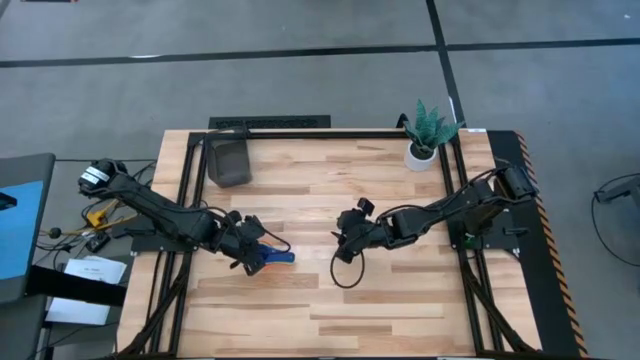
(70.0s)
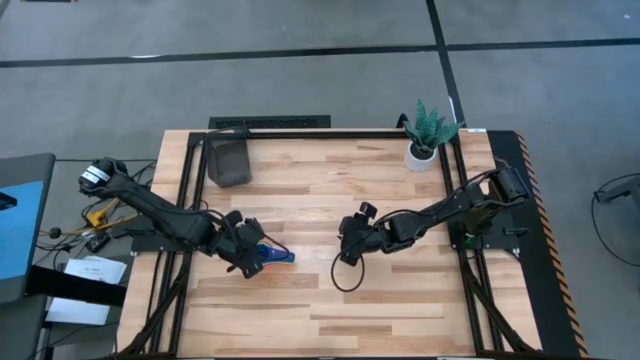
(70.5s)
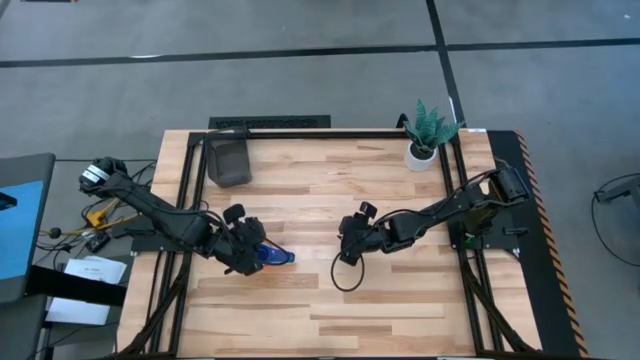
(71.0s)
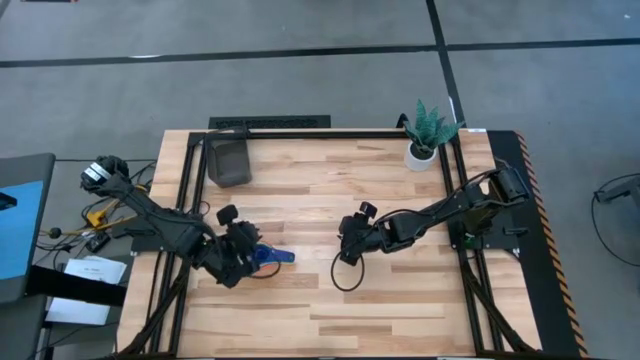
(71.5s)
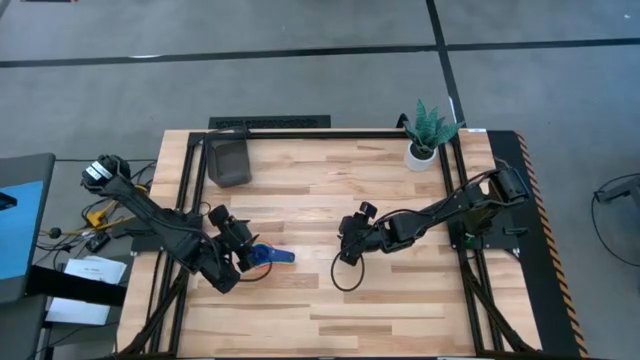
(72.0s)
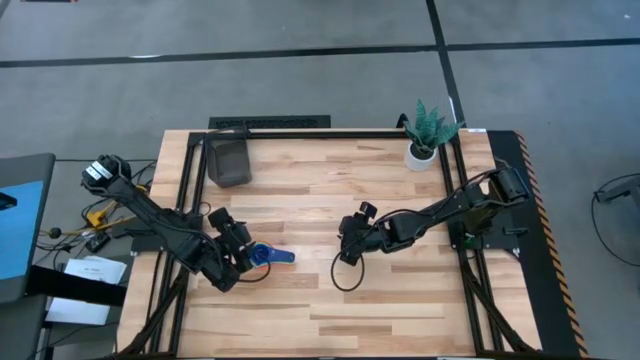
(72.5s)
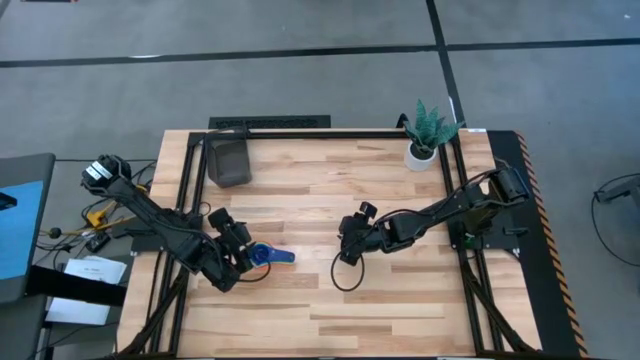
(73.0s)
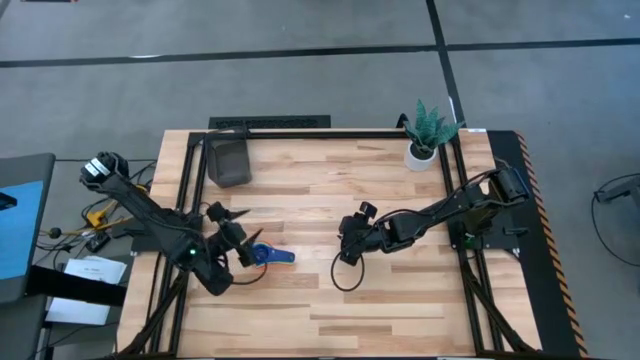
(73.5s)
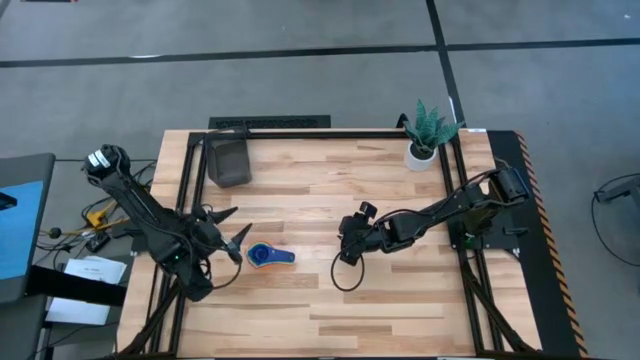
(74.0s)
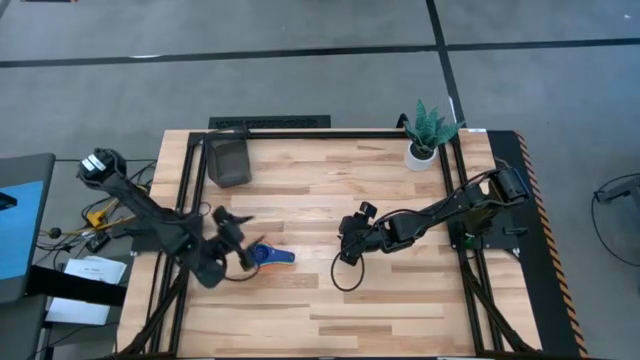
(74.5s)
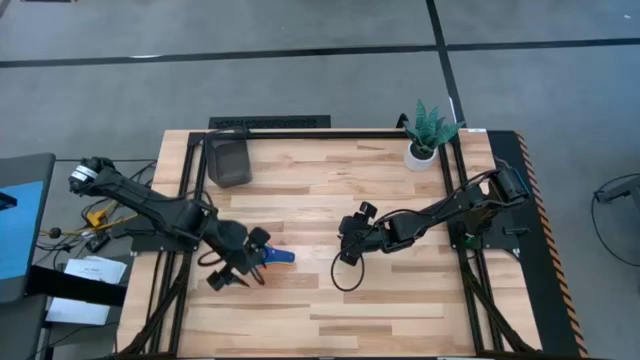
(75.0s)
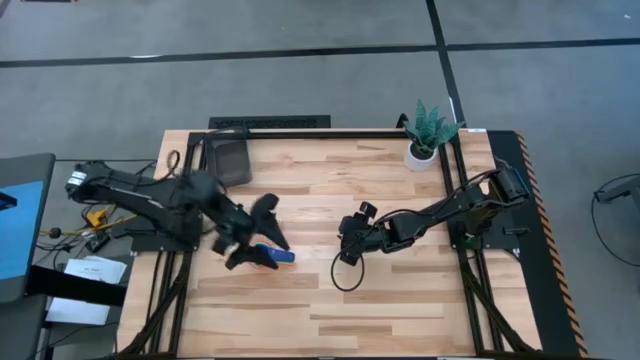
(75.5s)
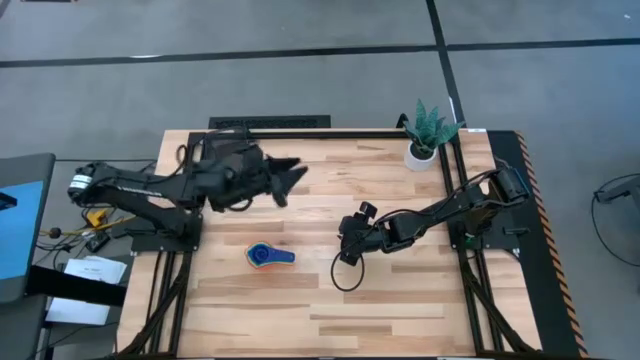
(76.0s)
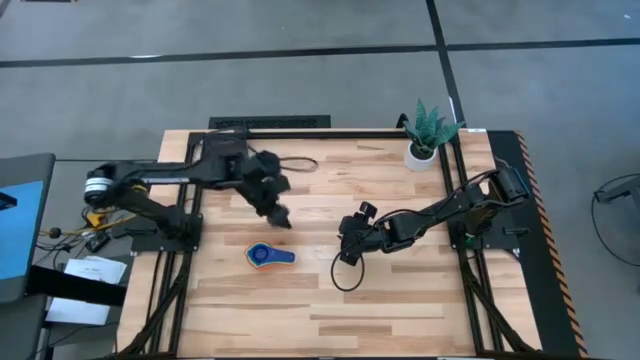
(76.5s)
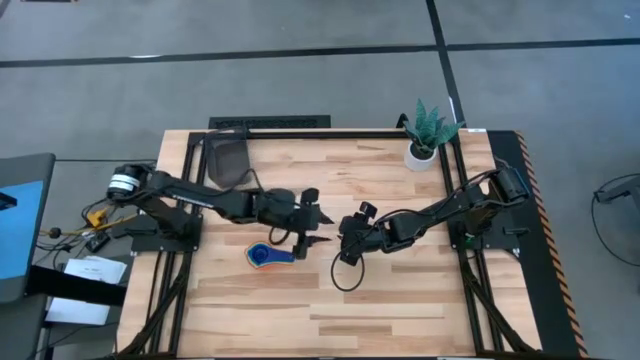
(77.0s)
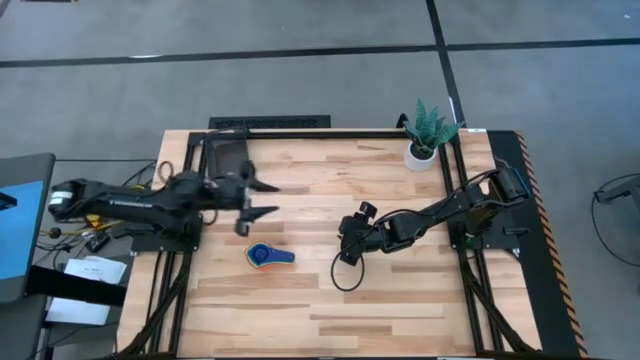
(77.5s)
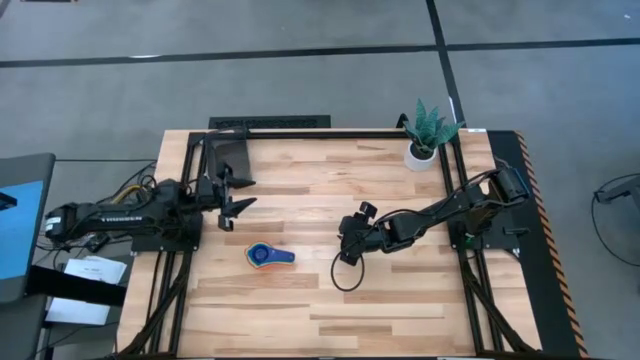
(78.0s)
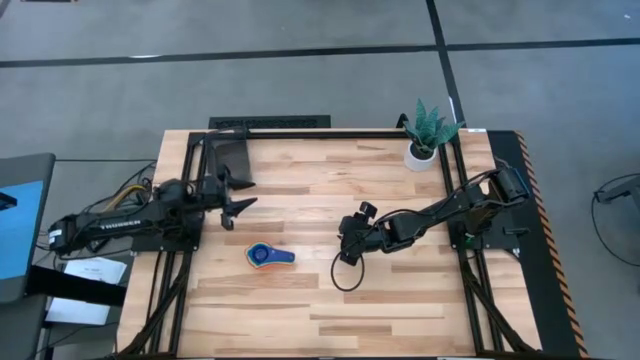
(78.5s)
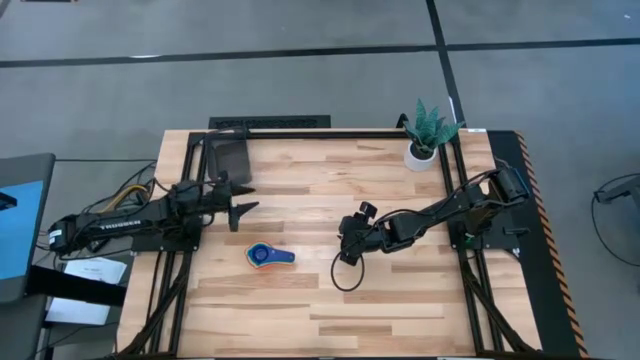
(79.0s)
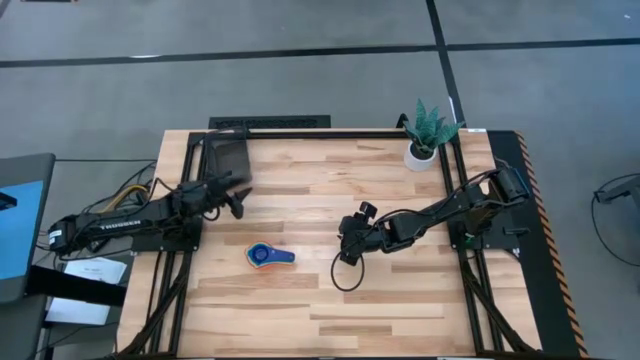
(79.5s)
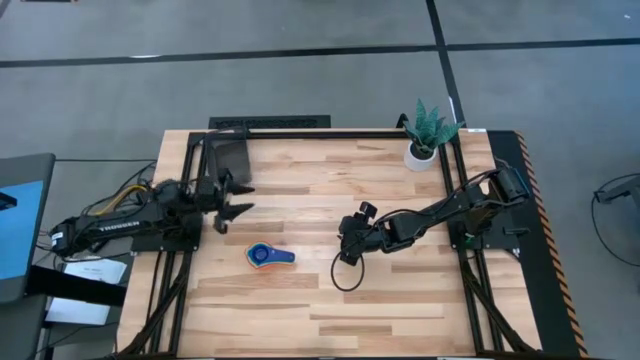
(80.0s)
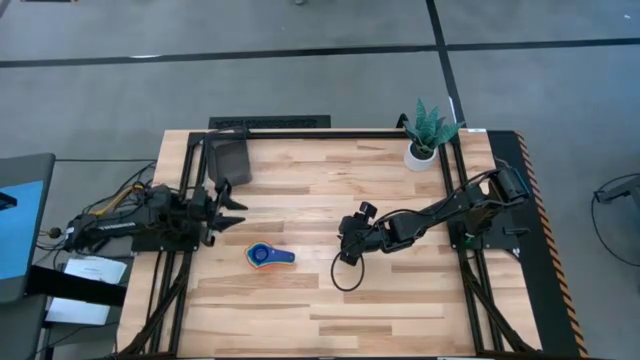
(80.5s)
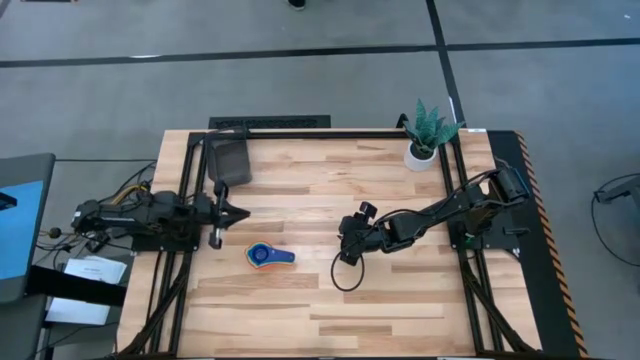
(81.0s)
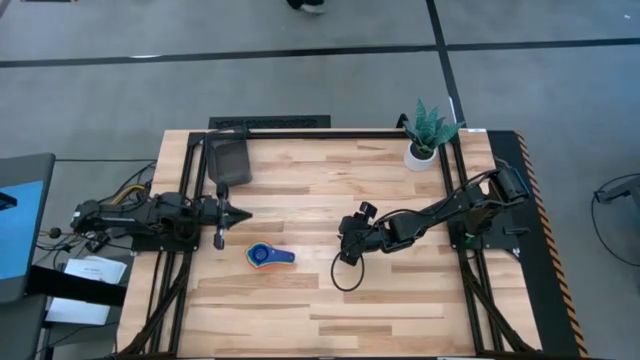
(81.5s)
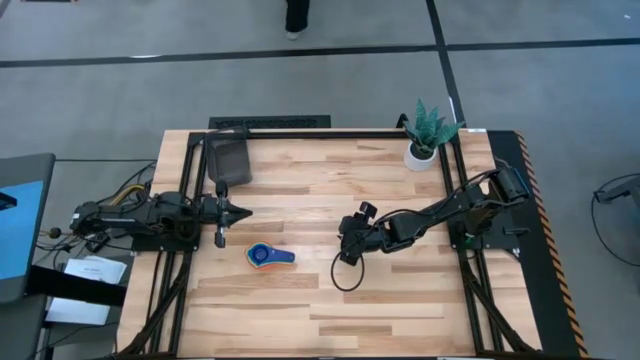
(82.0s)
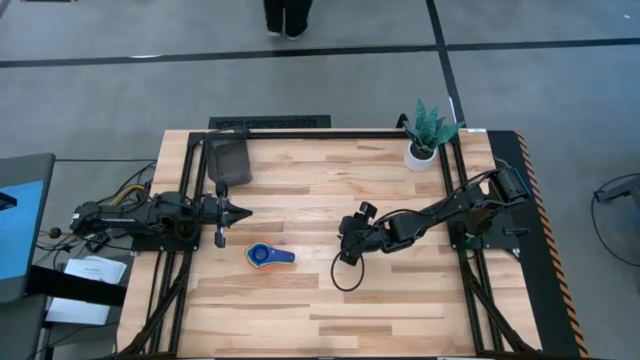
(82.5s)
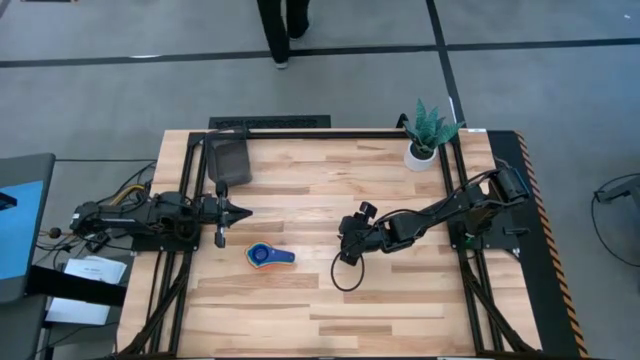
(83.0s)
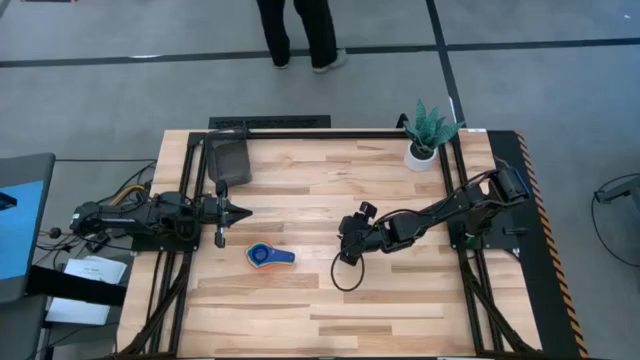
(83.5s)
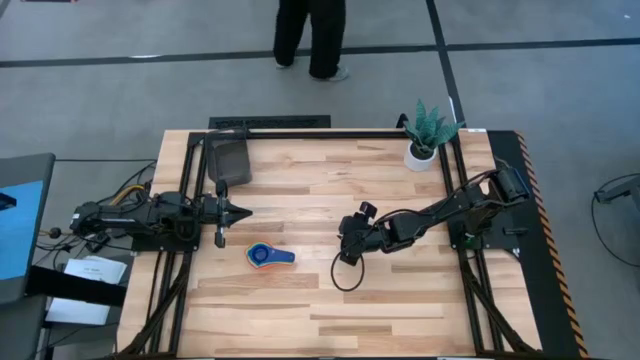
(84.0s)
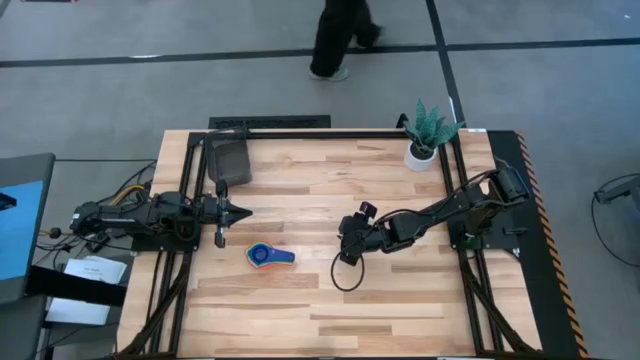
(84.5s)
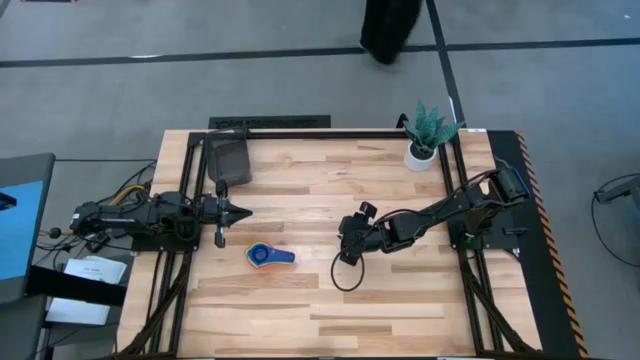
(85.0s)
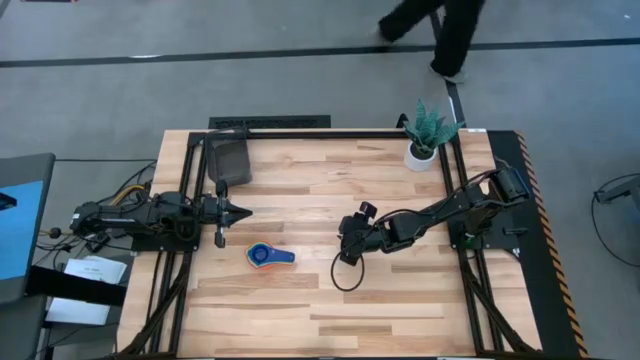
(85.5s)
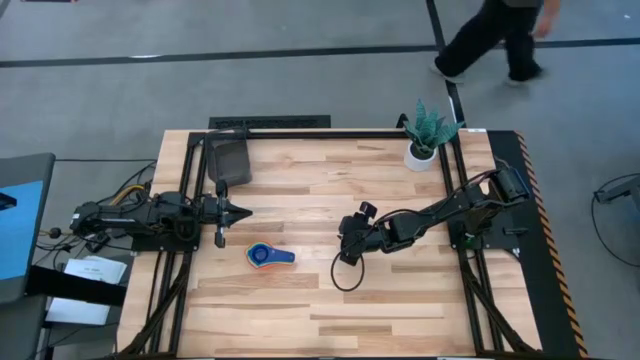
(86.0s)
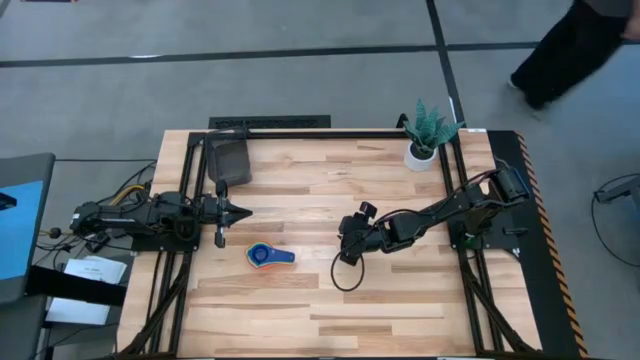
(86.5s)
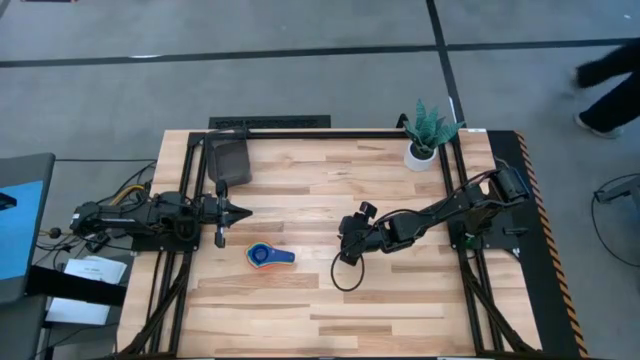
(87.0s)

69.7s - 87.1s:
Task: Nest measuring cups in basket
Return to Home Position

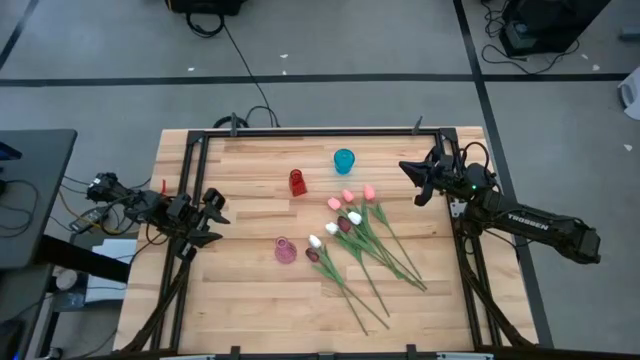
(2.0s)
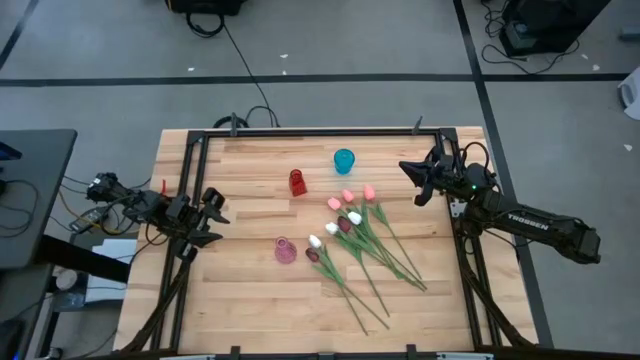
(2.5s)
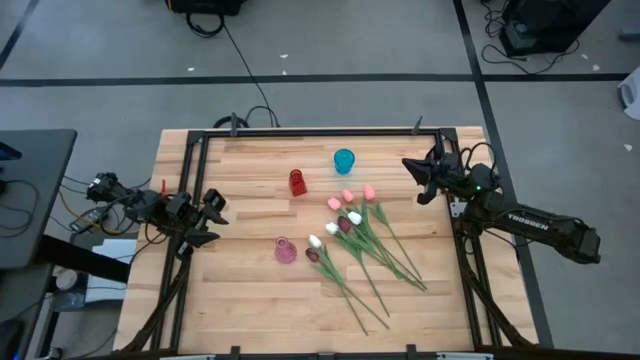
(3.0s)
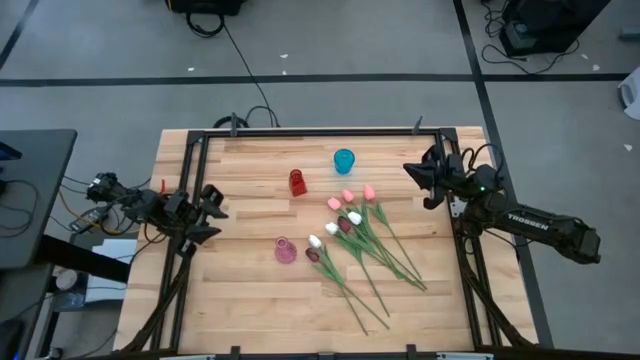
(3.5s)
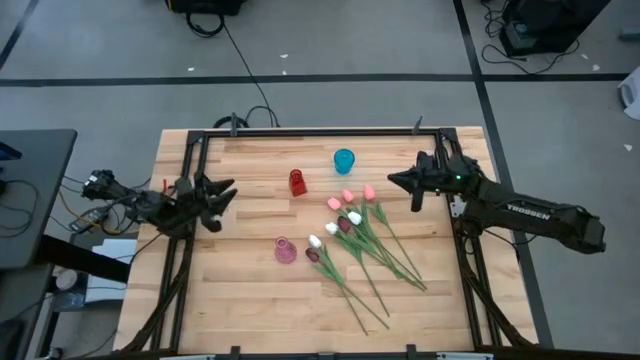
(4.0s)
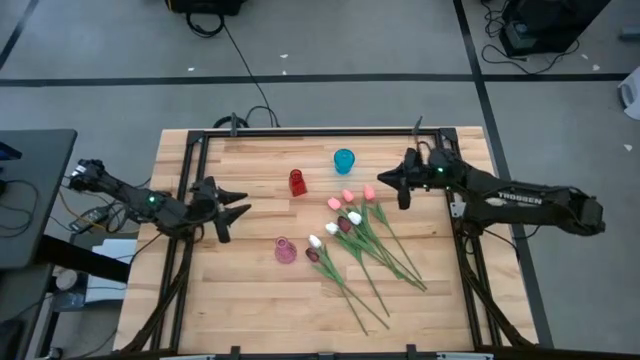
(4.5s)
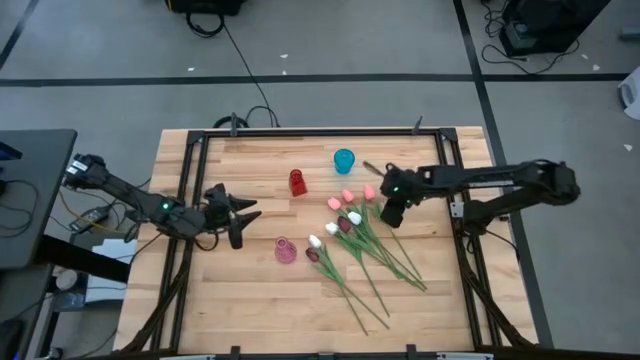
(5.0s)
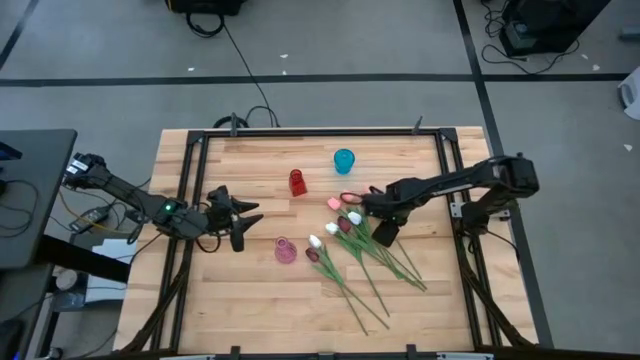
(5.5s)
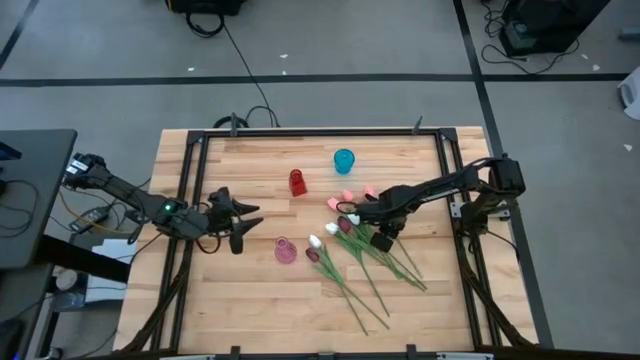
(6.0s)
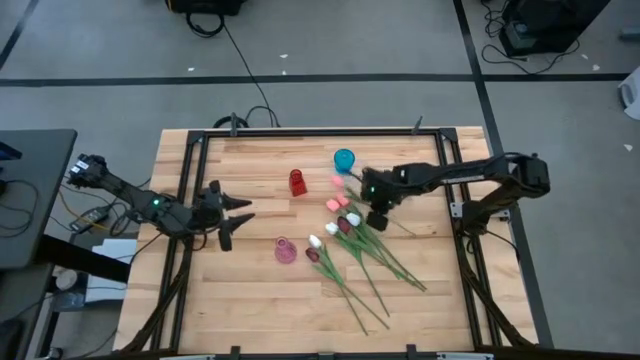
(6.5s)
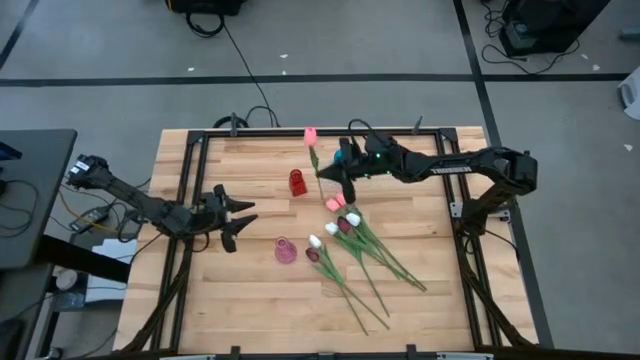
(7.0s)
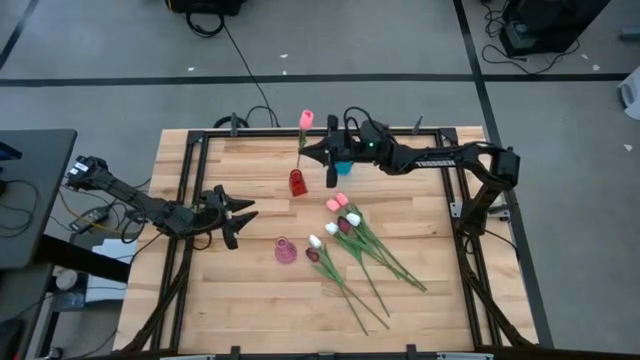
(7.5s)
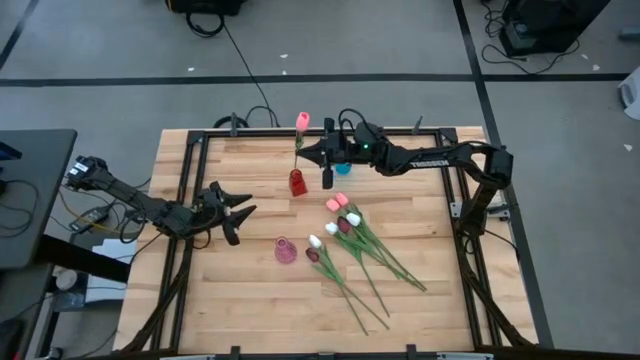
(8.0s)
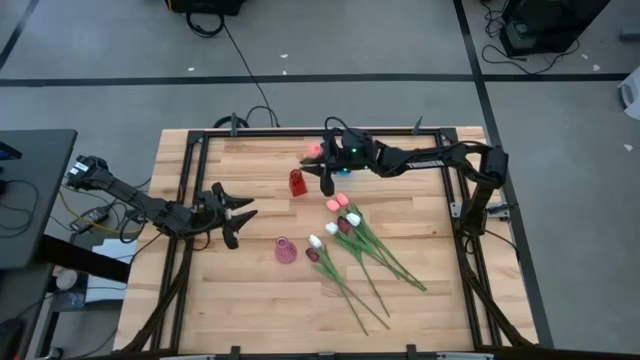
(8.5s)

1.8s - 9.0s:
Task: Sort flowers into vase by color
Put the pink flower into the red vase
